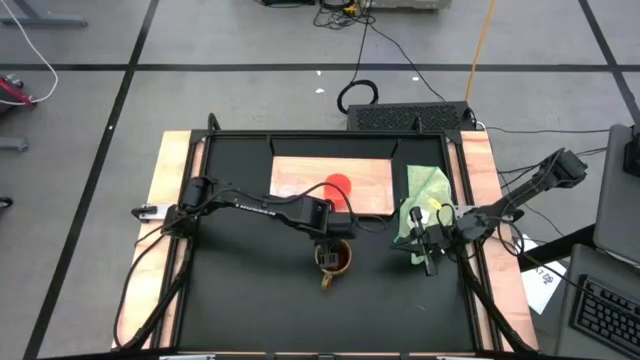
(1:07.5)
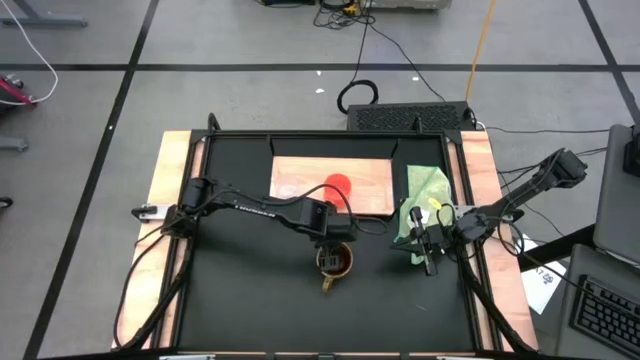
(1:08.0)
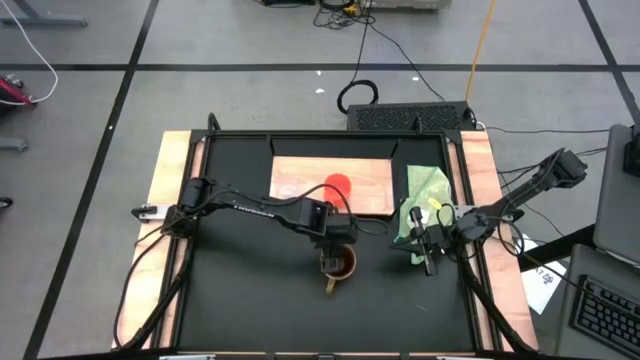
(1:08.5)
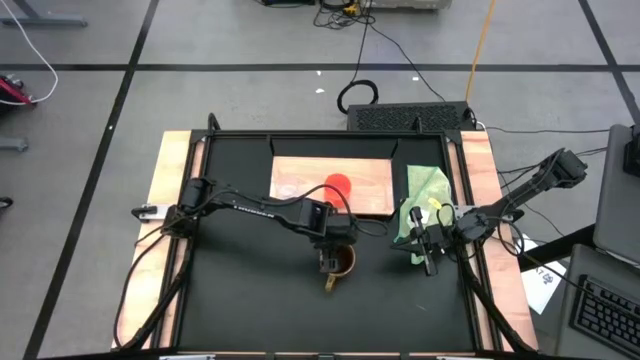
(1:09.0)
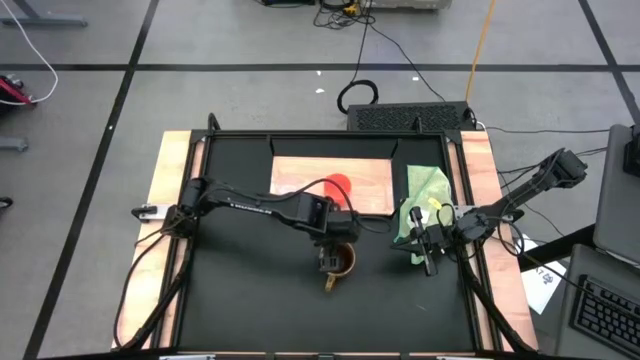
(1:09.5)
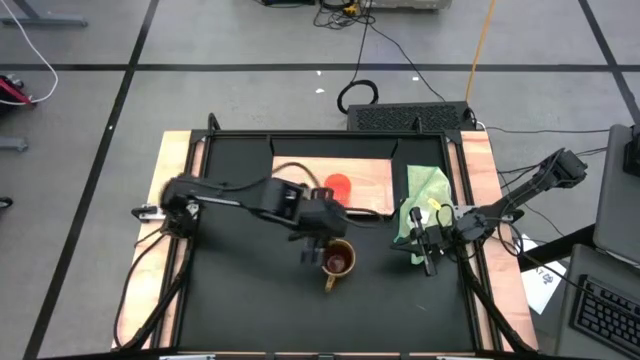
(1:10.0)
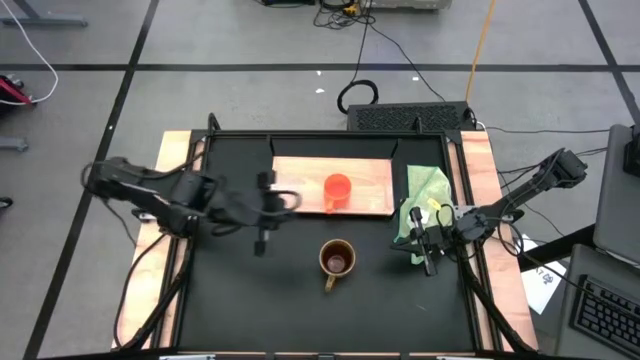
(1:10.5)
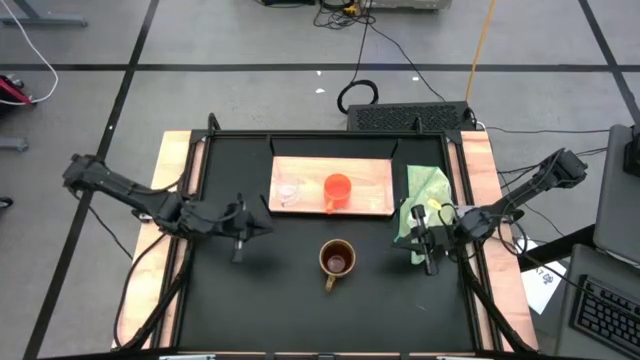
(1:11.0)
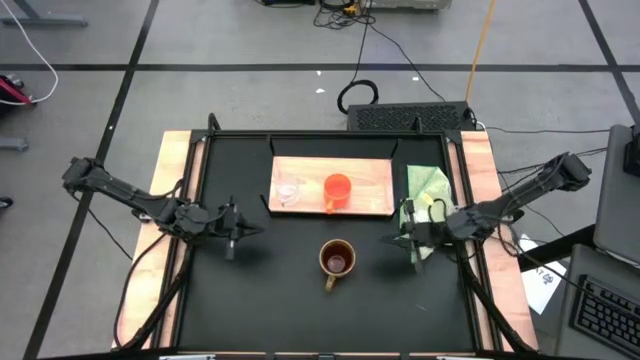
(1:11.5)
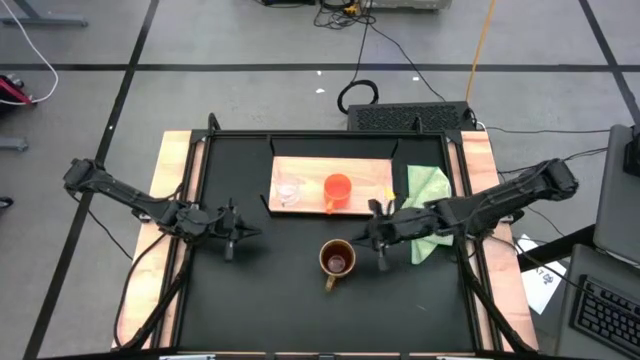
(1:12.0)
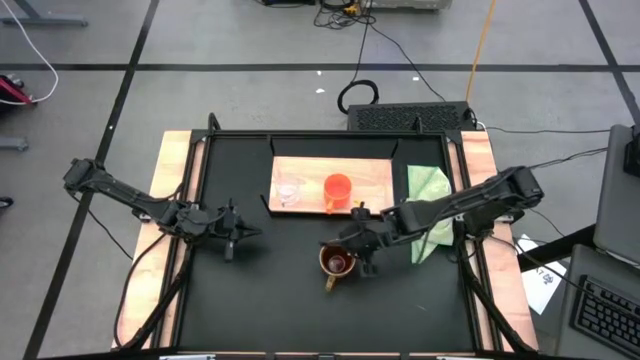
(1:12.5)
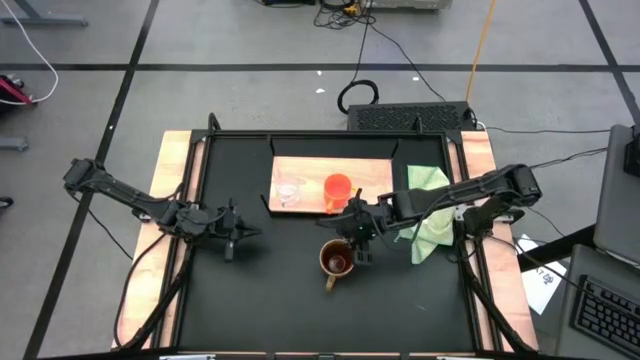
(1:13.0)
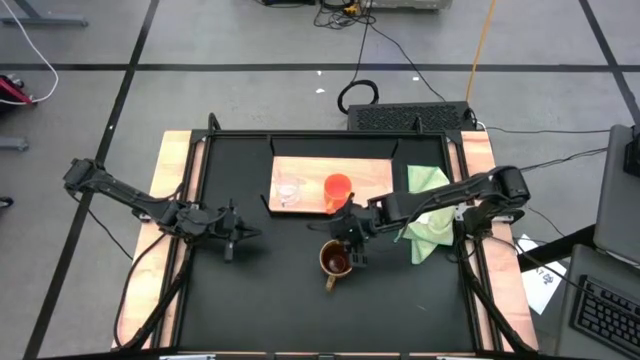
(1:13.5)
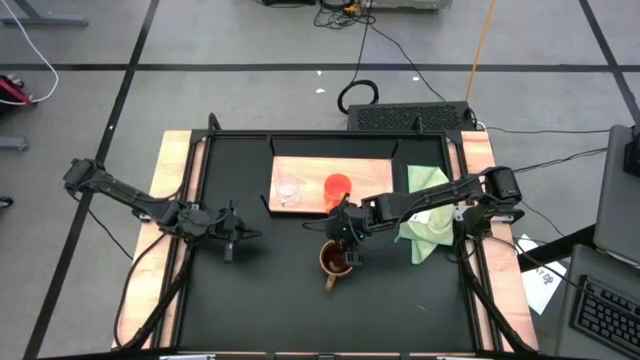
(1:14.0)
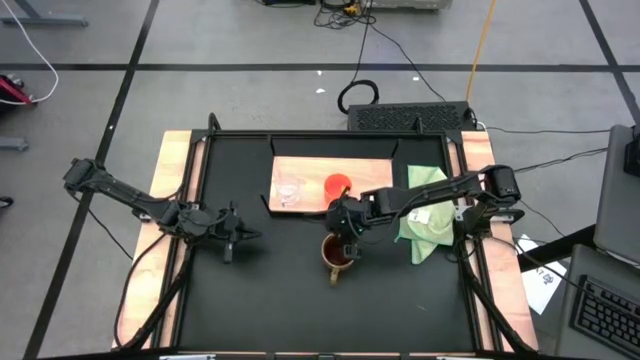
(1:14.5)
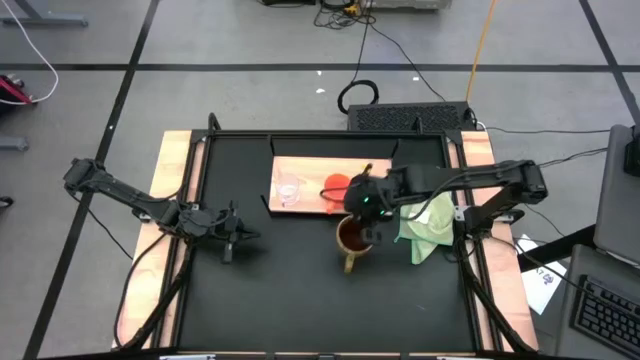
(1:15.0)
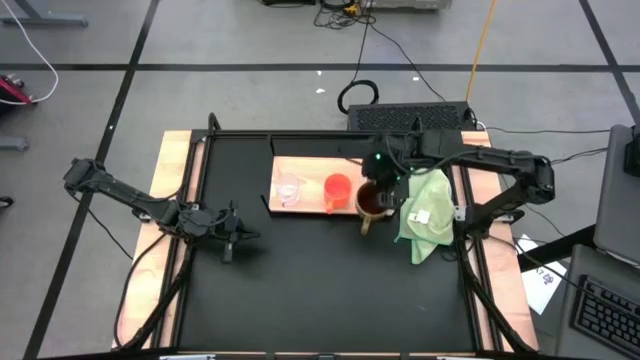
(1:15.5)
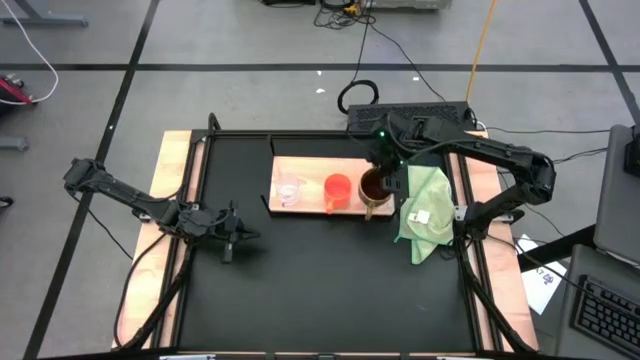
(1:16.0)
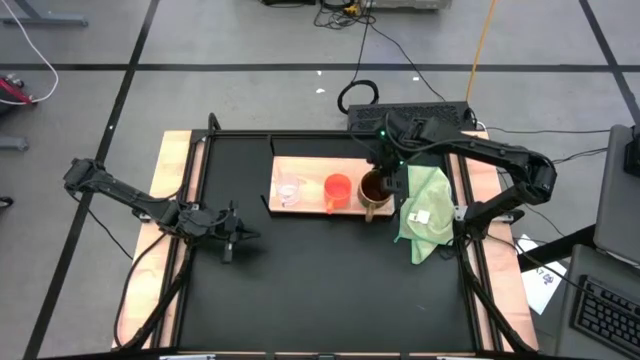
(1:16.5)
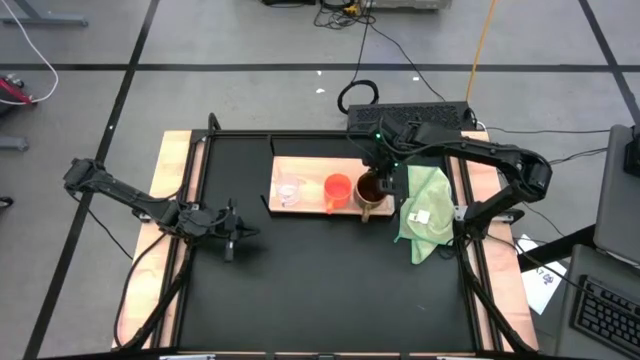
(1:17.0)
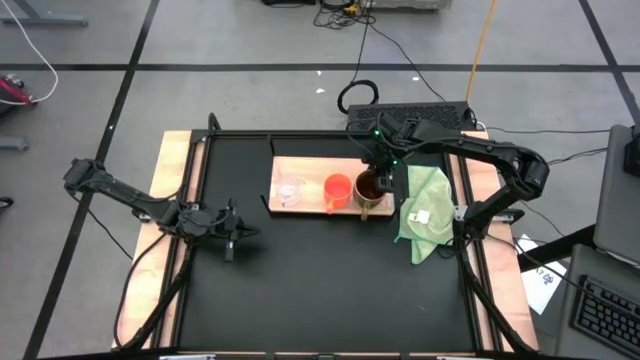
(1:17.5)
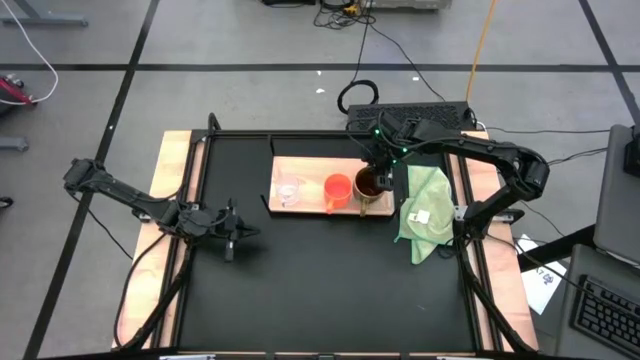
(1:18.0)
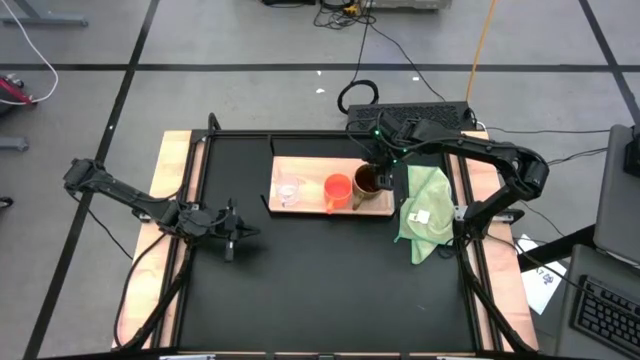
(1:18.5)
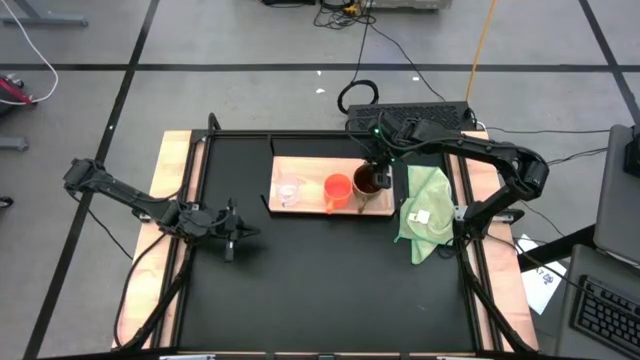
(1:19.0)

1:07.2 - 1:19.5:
Task: Stack small to large cups/mugs on shelf
Put the brown mug on the shelf

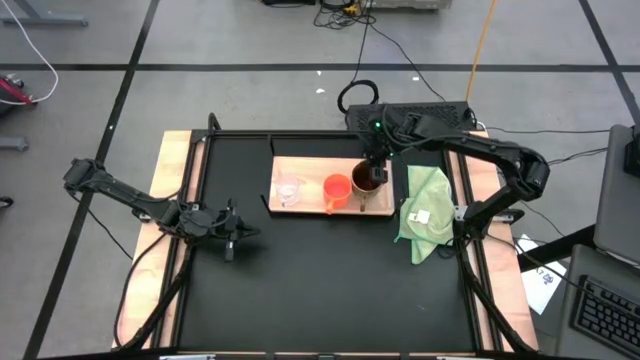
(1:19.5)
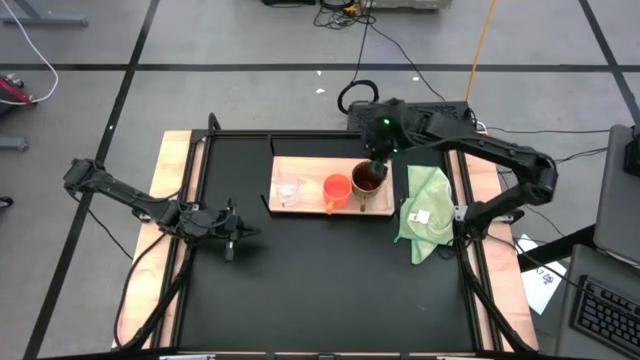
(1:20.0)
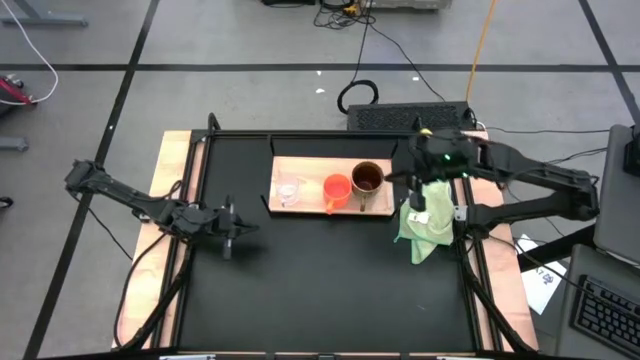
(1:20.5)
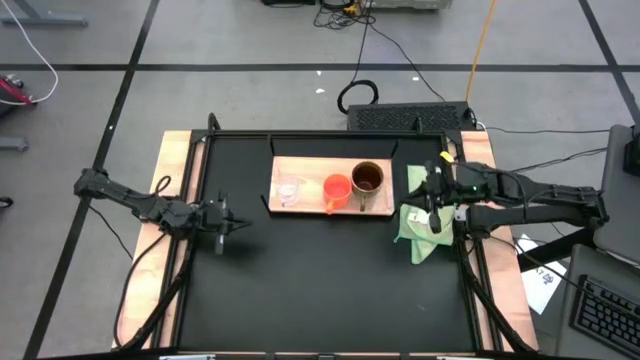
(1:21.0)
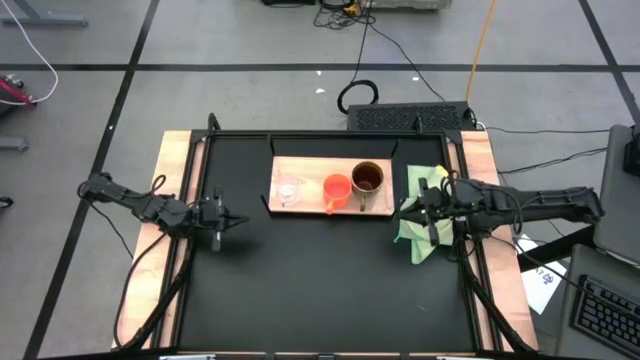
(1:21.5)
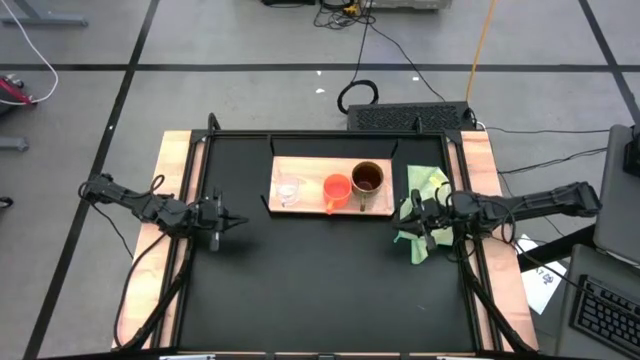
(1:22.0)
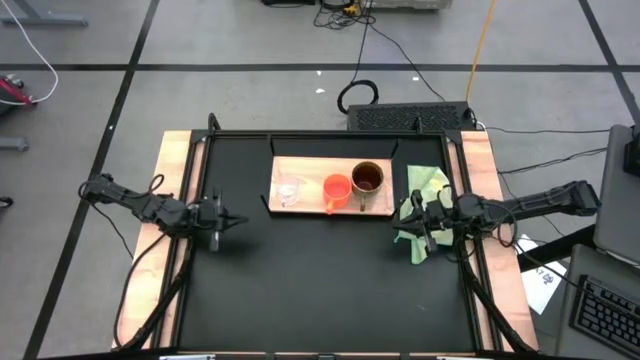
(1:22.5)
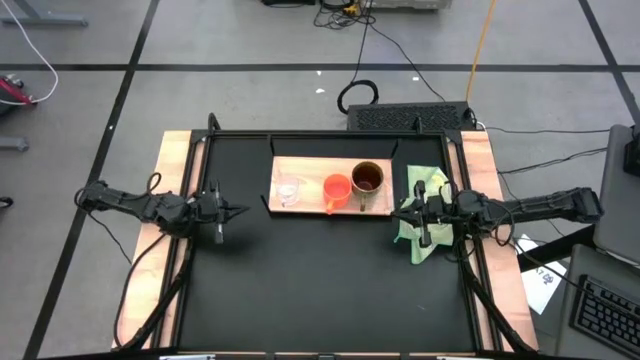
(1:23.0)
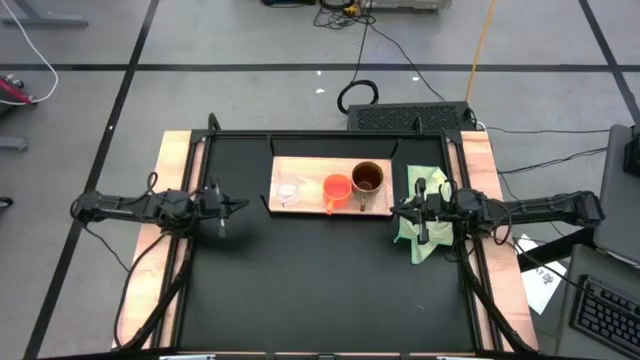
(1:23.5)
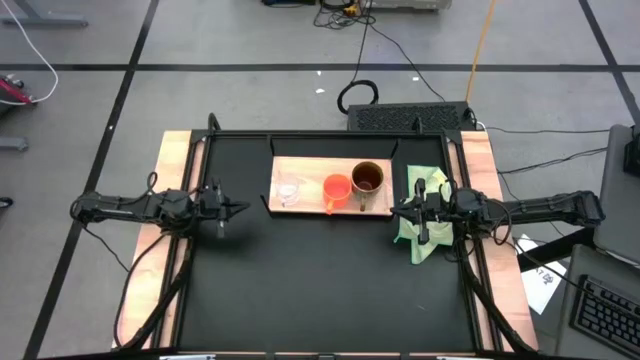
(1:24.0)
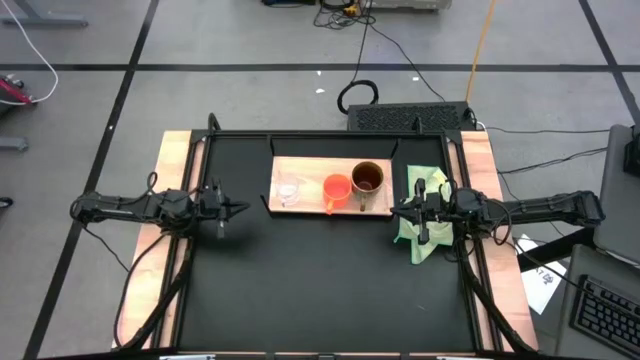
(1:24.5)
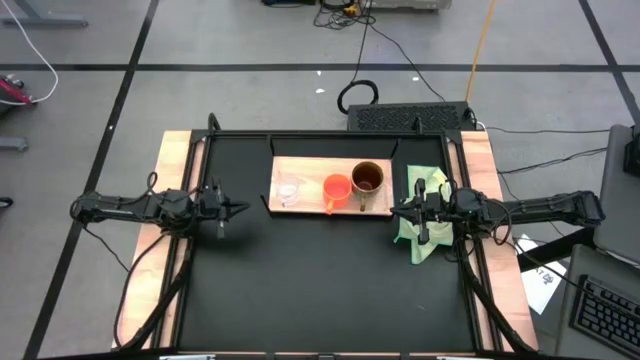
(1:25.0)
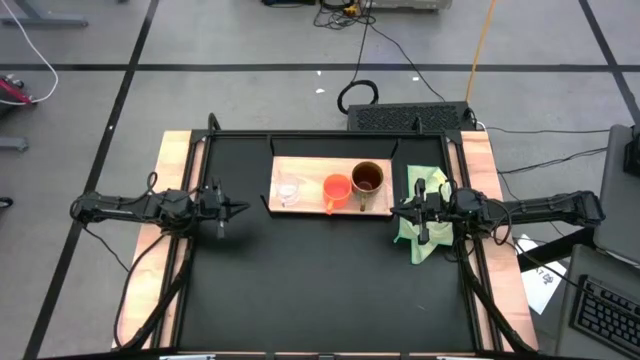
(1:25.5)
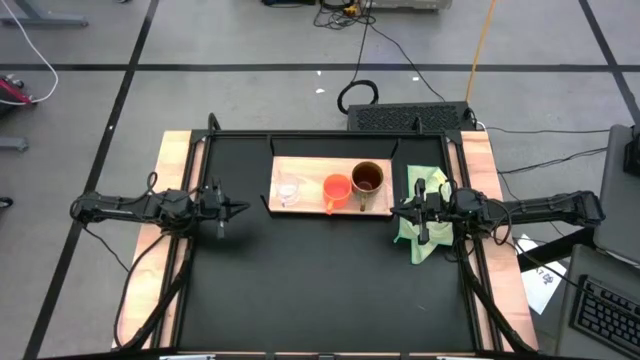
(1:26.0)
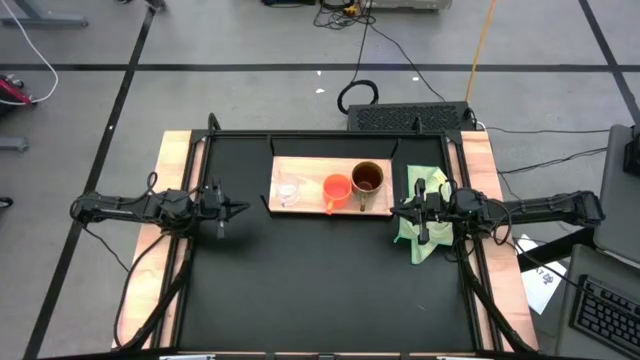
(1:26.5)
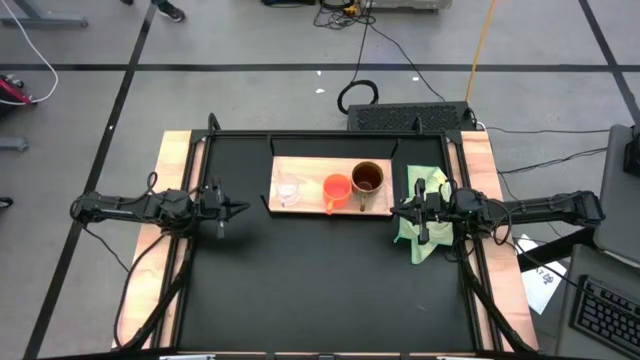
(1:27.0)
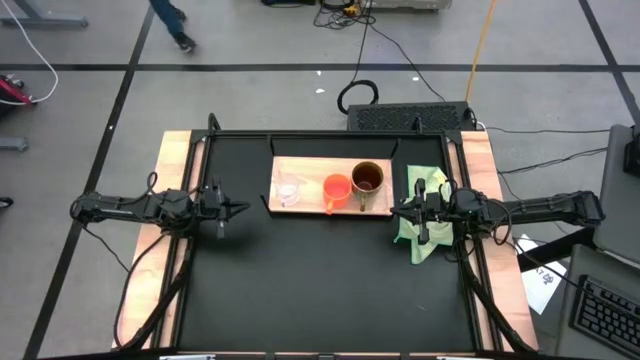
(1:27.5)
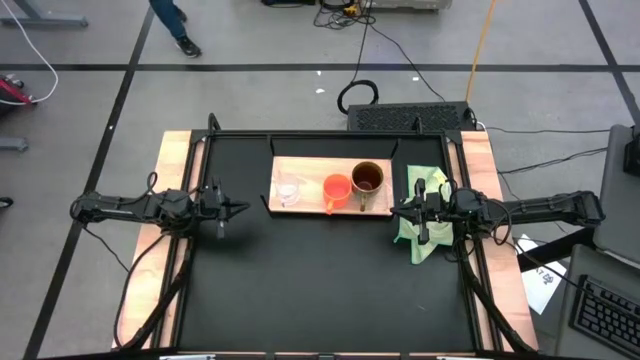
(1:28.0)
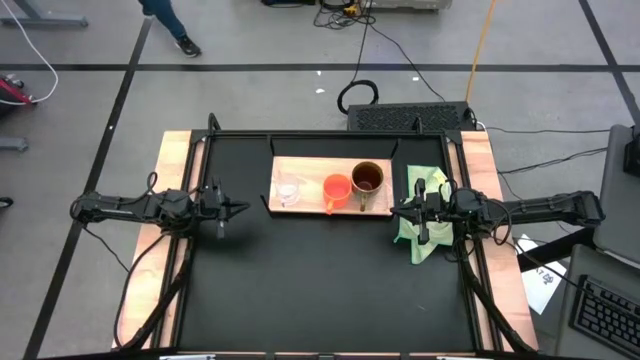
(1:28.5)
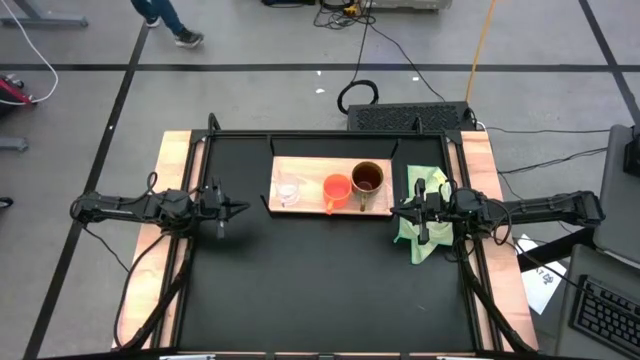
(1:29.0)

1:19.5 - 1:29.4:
Return to Home Position
